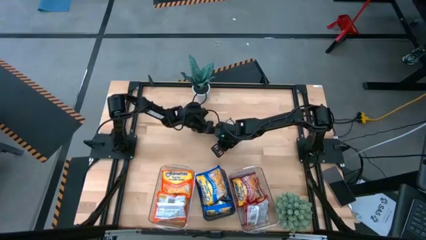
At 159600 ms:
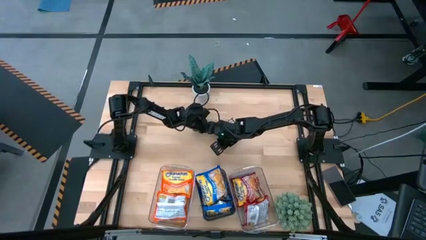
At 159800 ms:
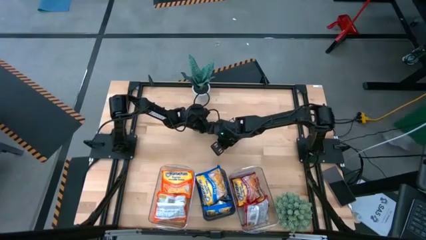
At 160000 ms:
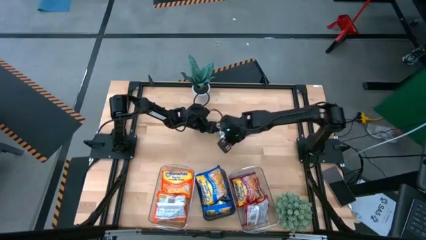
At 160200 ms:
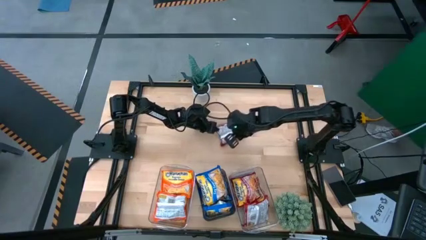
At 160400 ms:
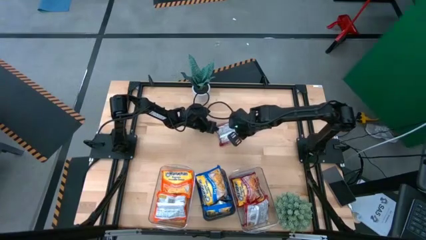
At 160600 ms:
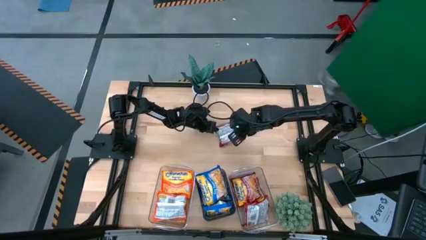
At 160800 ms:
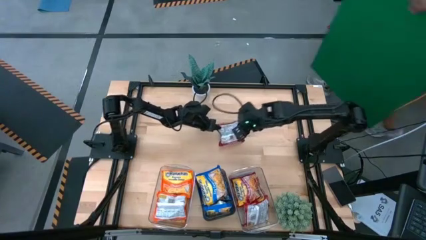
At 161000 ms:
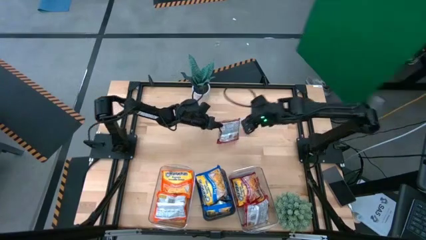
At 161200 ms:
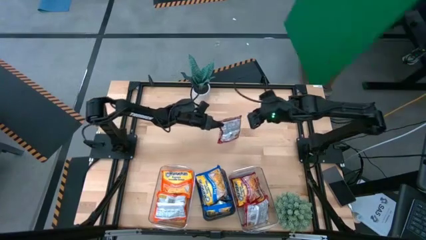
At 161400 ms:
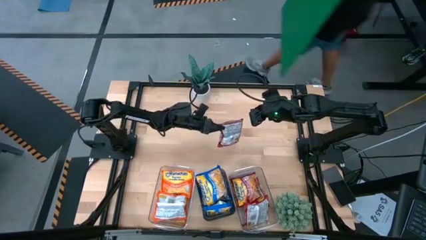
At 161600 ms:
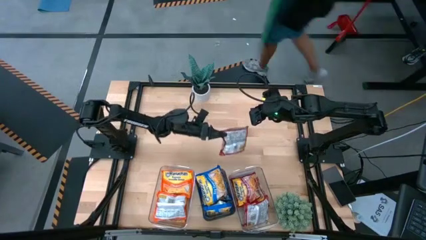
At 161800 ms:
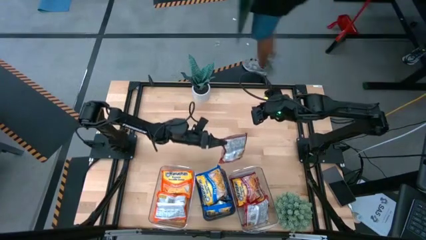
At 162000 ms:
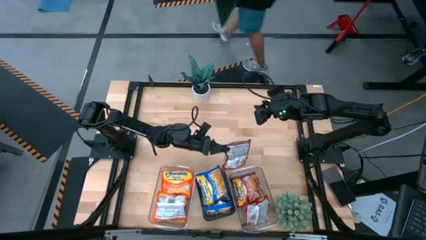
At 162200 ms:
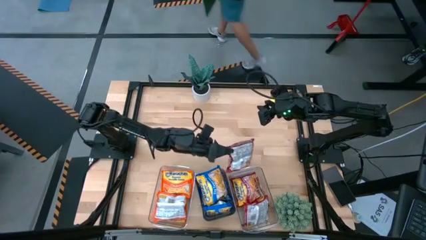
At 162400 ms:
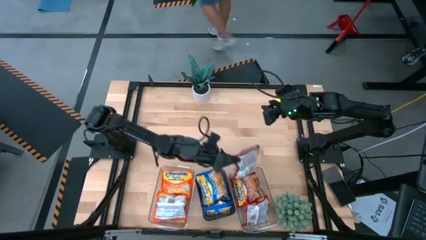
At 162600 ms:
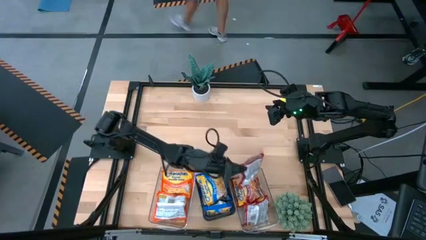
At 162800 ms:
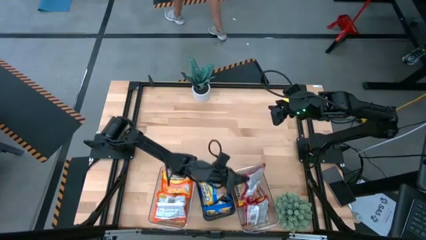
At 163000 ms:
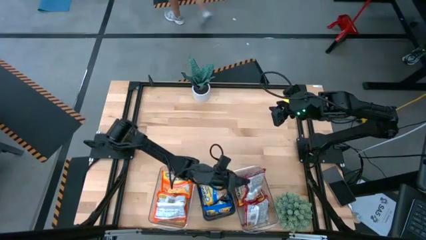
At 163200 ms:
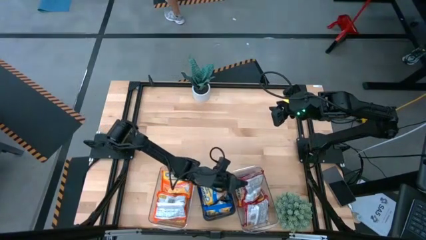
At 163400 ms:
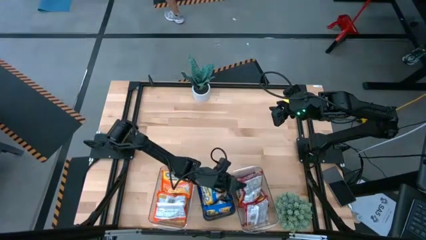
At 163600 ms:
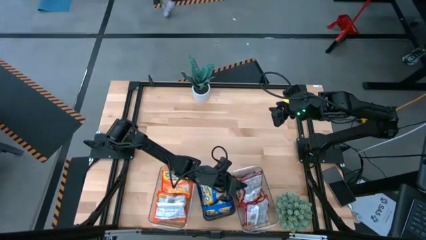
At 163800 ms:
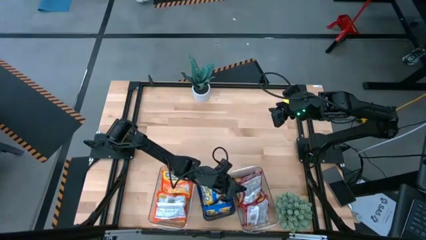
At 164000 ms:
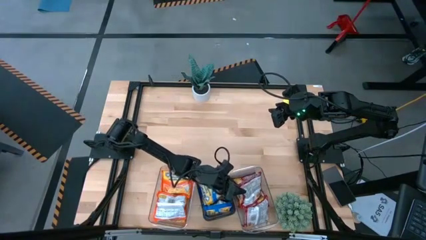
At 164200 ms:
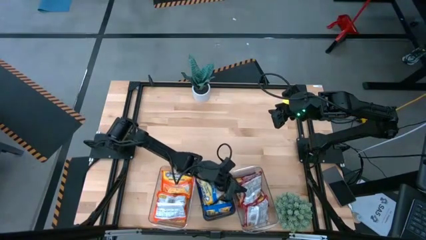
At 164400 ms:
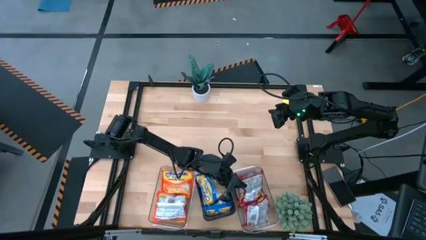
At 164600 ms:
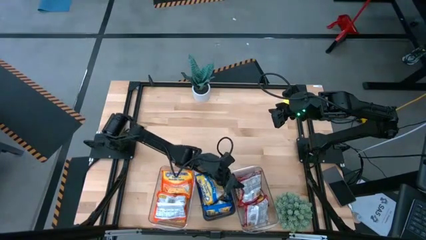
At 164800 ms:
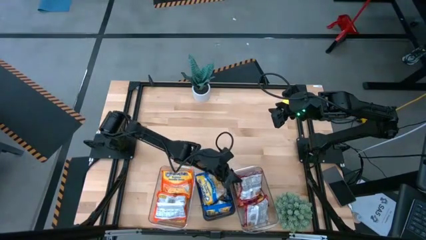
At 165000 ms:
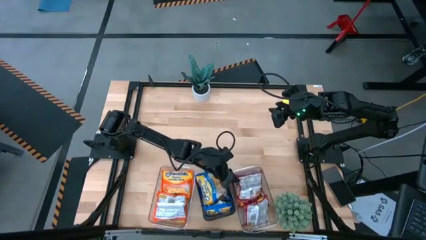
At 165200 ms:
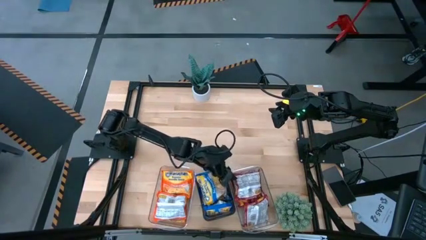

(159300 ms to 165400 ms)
Task: Sort Maruchan noodles
Put the red noodle pack into the right transparent bin

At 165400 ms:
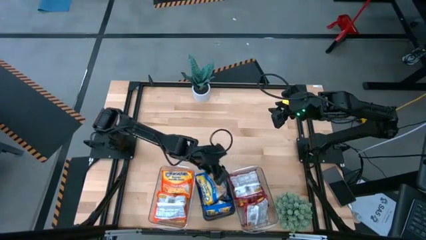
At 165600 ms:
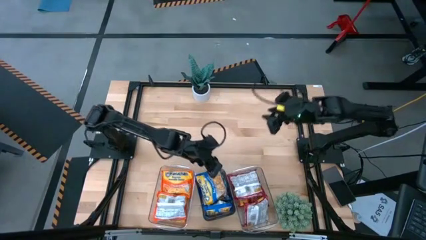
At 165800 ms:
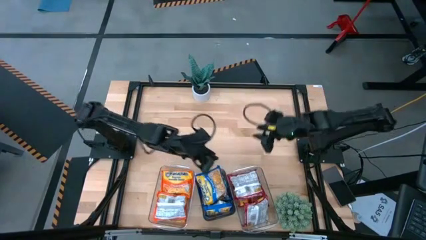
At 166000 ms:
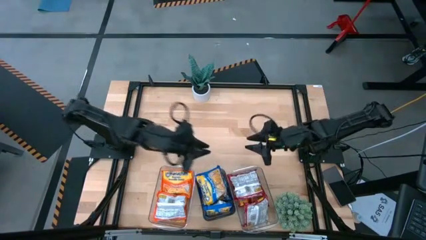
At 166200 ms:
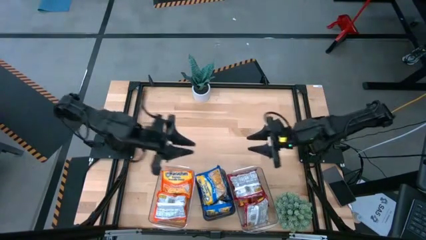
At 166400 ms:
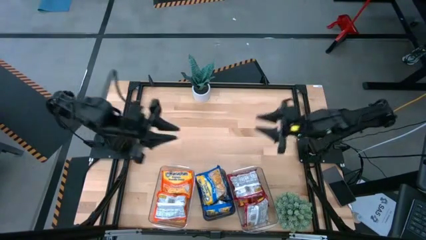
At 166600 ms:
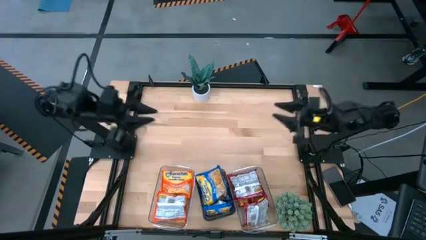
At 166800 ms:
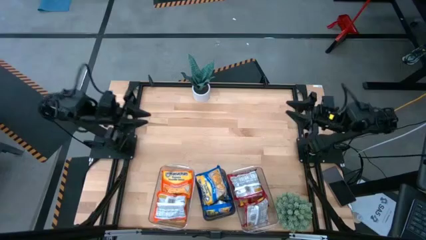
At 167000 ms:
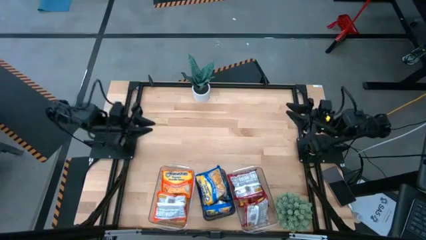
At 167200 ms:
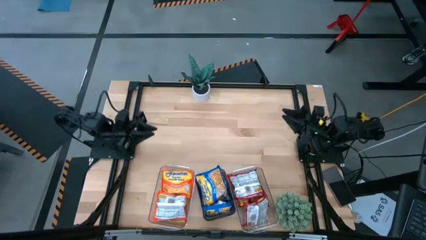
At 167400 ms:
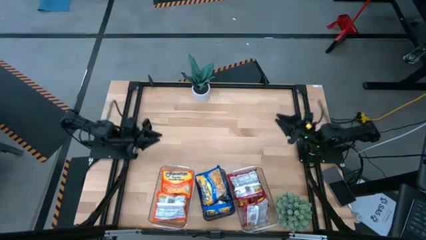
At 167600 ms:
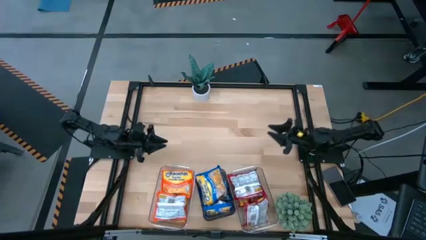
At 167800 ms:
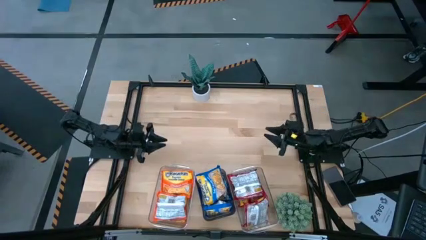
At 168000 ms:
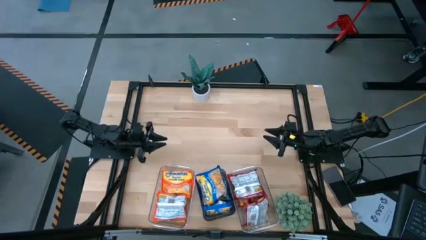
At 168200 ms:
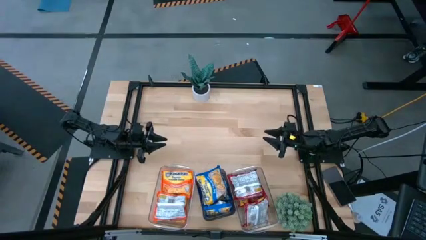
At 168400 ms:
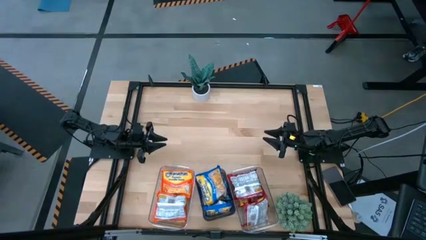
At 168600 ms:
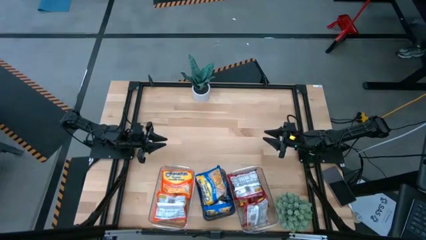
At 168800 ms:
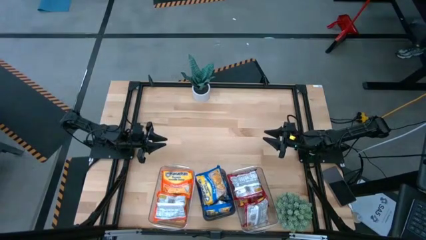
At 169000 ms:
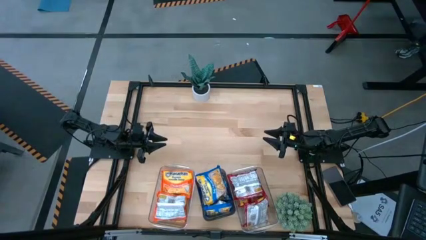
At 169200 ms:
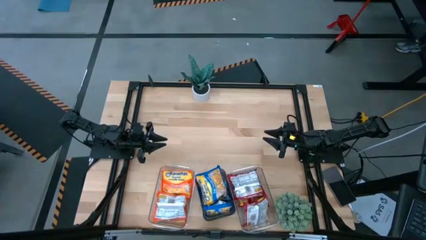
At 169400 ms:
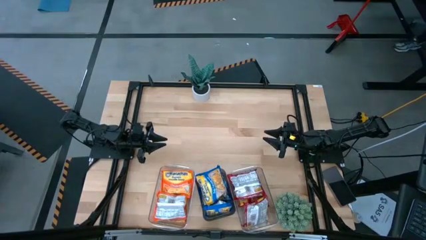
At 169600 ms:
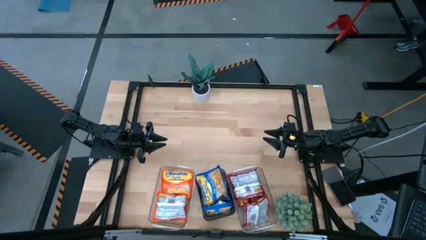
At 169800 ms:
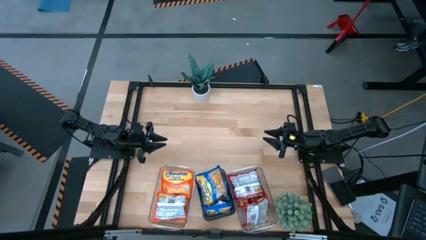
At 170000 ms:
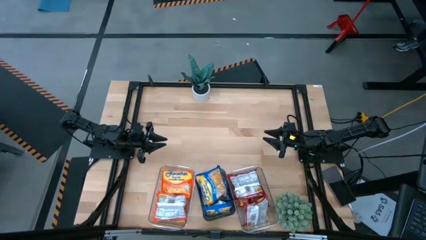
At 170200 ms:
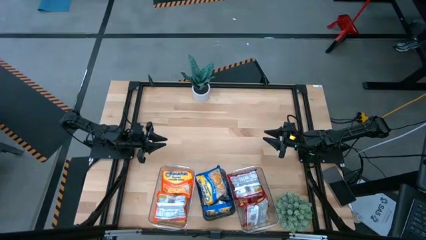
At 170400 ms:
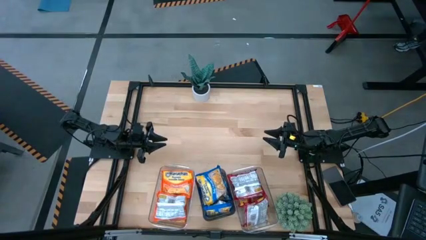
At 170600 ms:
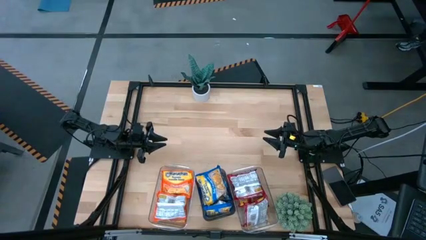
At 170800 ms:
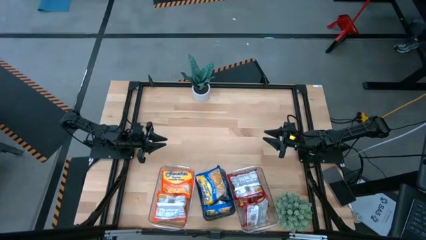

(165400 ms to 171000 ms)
Return to Home Position

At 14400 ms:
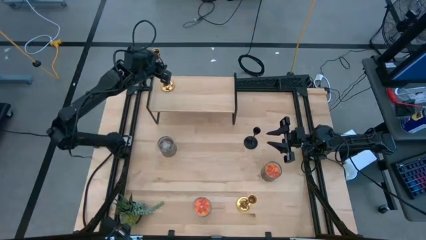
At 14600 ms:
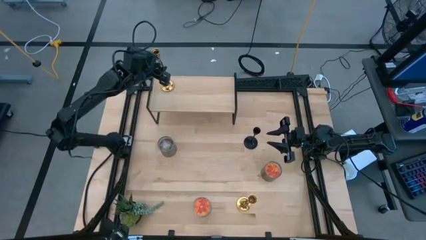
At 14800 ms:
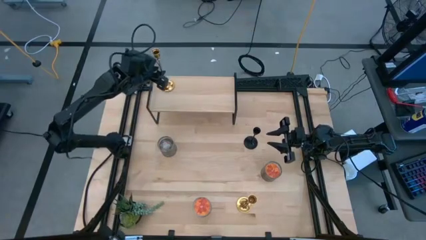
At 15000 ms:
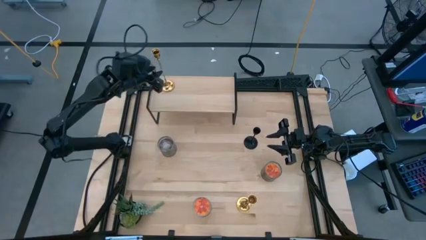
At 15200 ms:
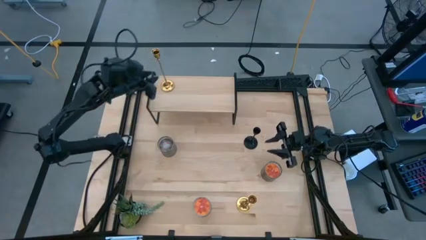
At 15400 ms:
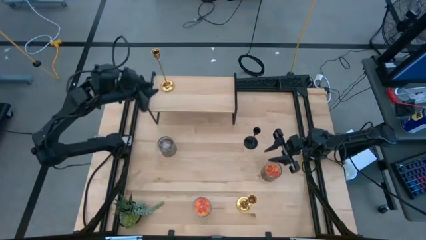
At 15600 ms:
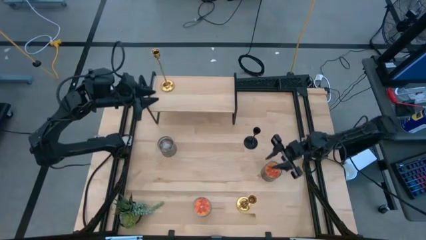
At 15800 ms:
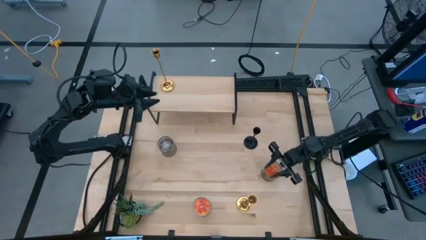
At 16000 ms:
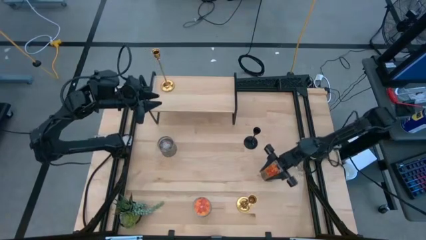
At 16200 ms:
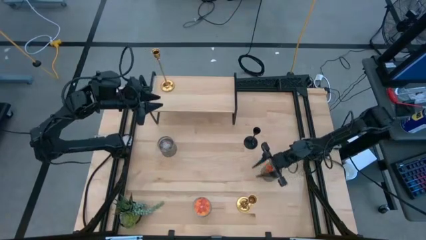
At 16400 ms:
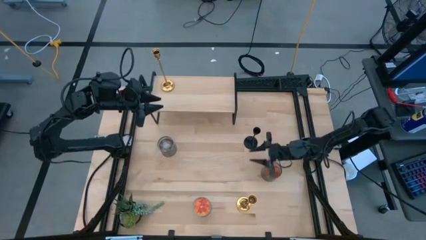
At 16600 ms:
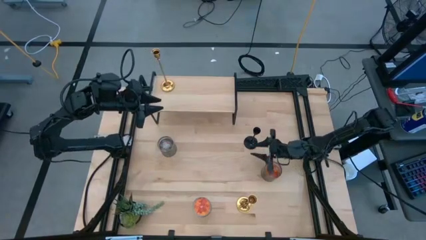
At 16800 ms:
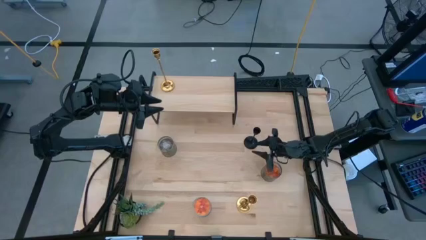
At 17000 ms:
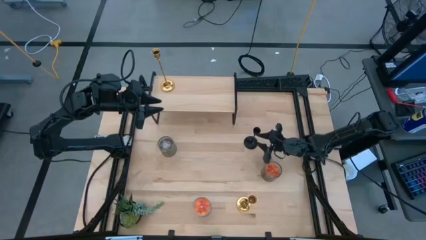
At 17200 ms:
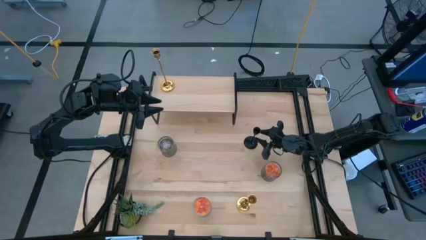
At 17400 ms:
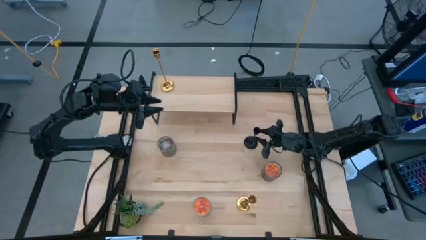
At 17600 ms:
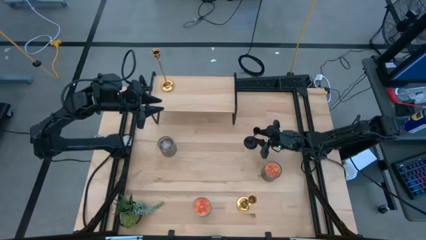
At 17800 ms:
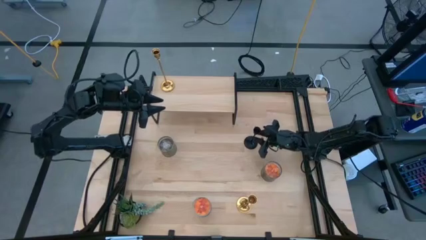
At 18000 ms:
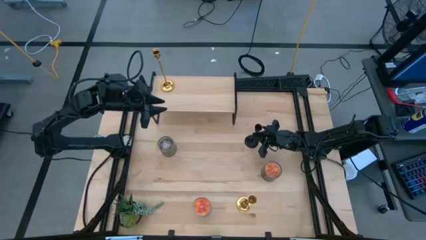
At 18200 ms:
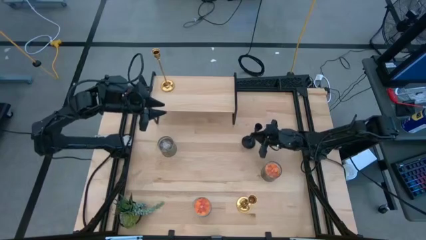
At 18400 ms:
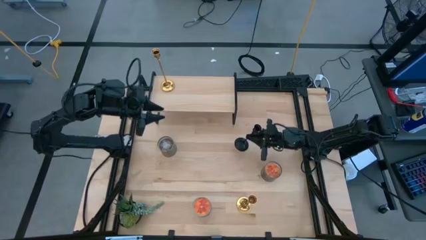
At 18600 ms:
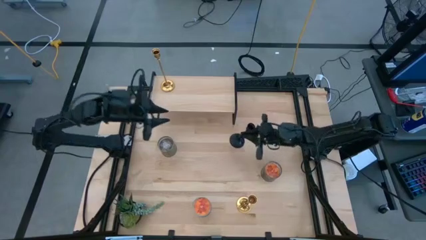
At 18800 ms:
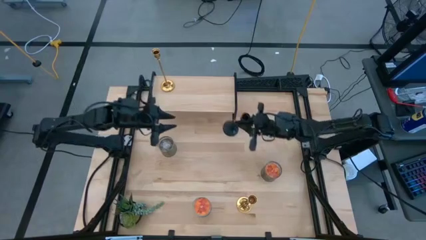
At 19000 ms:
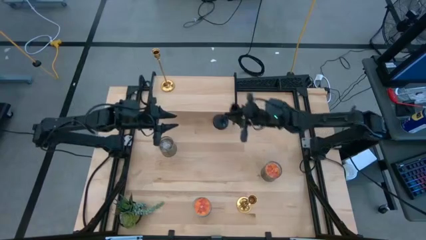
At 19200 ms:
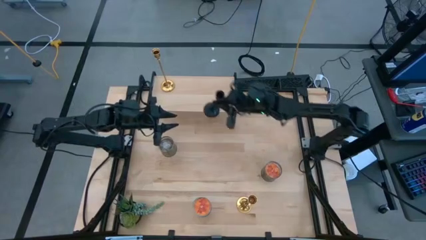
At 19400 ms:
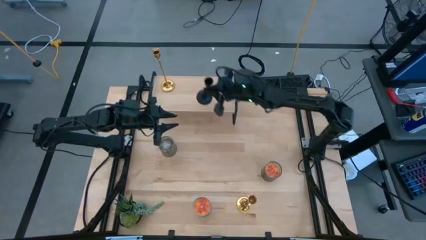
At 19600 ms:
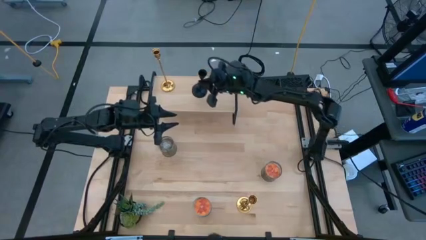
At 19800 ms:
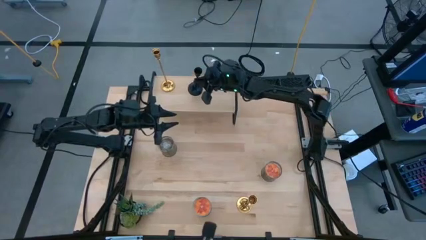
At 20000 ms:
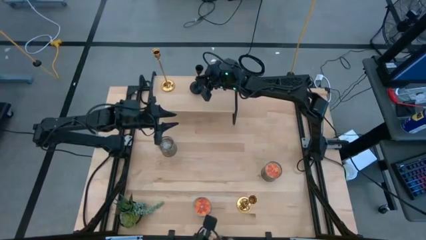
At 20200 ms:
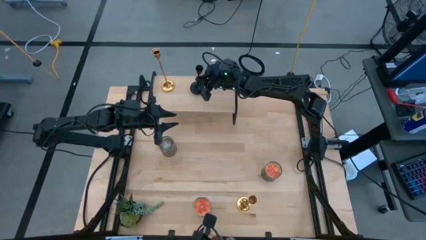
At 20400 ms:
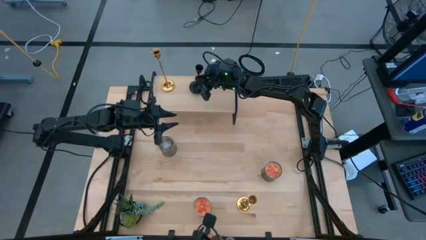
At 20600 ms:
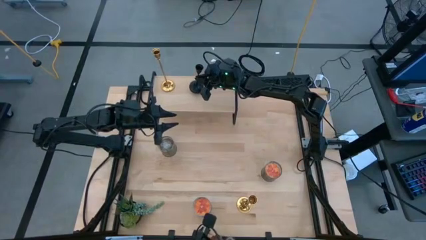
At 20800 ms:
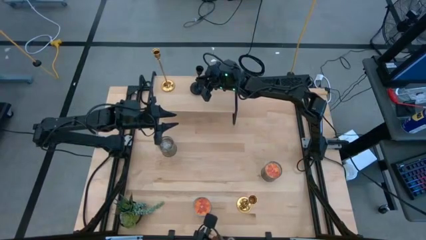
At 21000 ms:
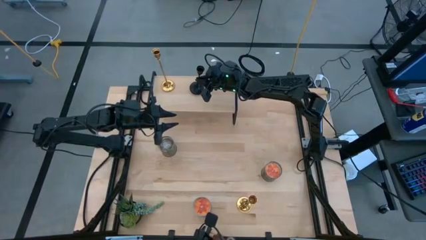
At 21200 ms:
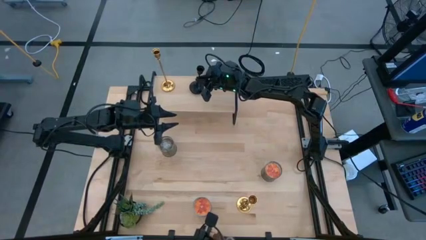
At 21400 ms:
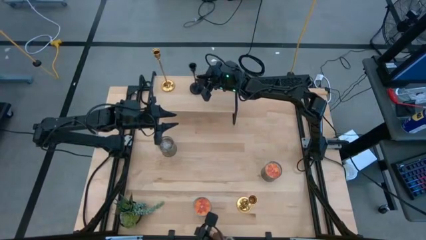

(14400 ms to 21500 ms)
Task: Pick & Place candle stick holders
Put the black candle holder on the shelf
